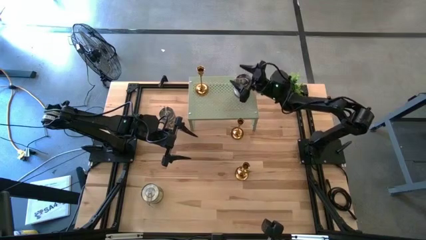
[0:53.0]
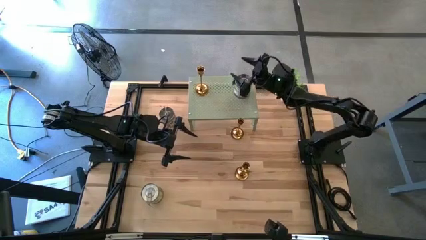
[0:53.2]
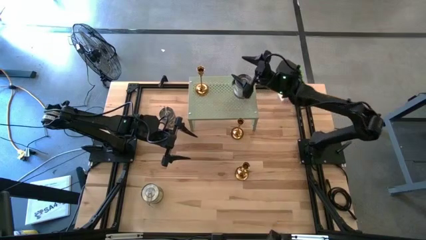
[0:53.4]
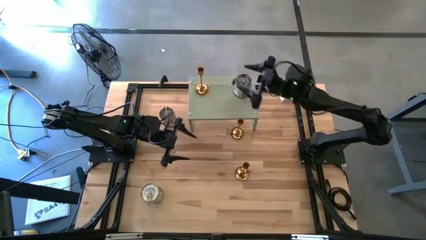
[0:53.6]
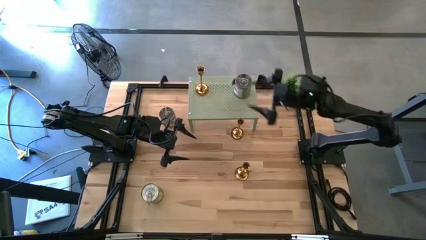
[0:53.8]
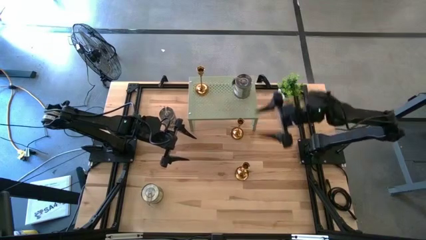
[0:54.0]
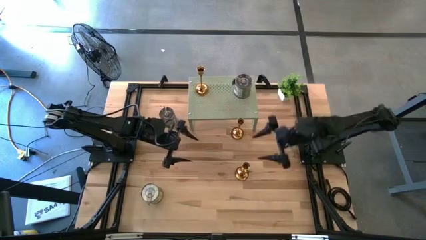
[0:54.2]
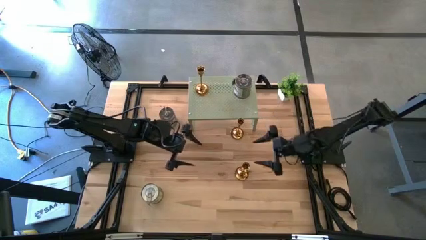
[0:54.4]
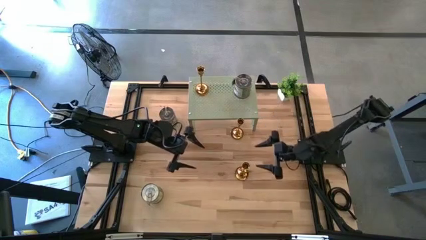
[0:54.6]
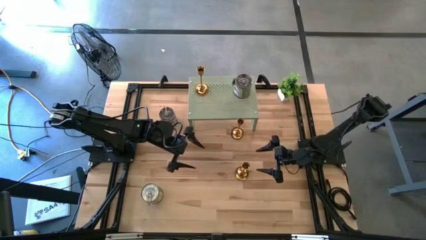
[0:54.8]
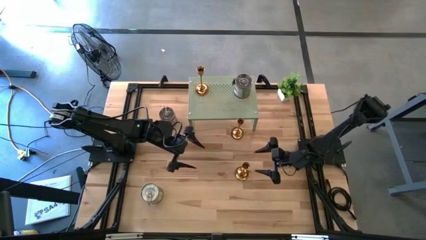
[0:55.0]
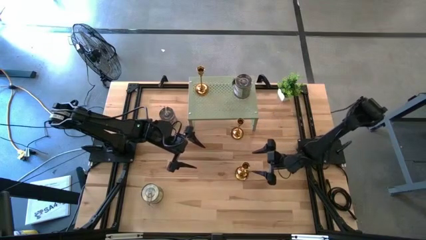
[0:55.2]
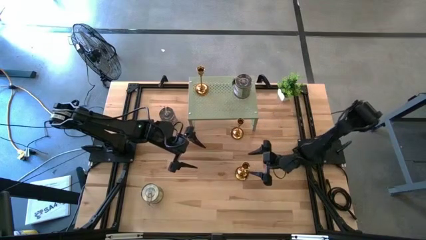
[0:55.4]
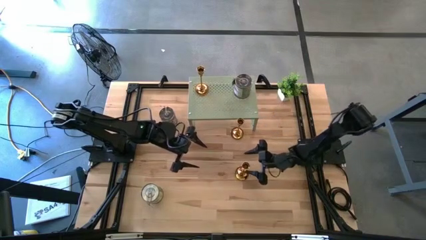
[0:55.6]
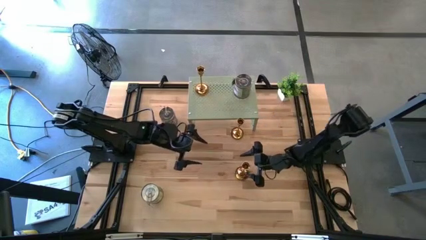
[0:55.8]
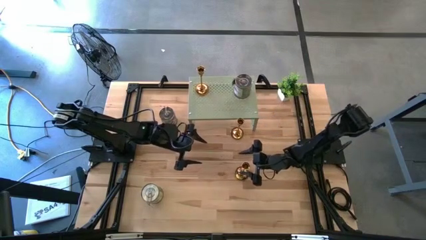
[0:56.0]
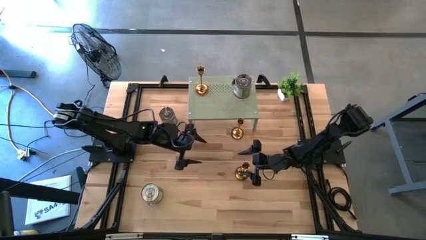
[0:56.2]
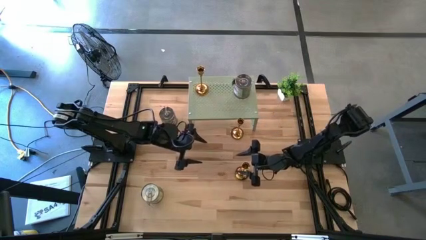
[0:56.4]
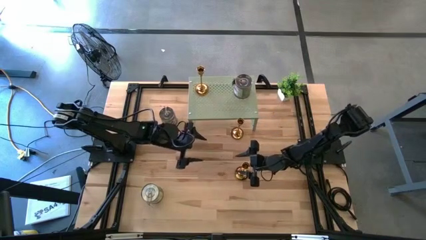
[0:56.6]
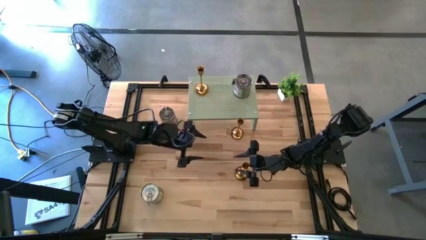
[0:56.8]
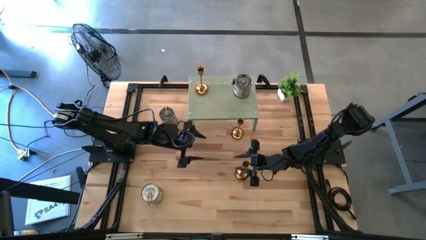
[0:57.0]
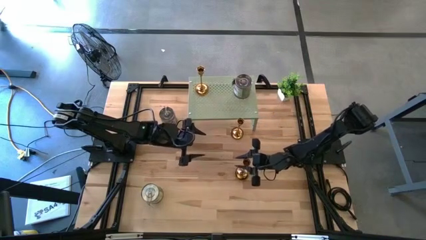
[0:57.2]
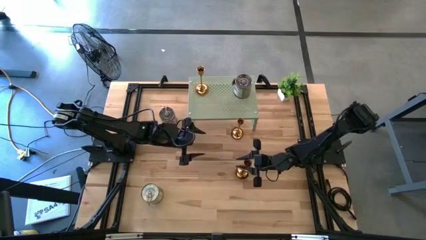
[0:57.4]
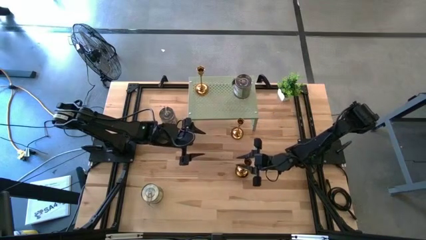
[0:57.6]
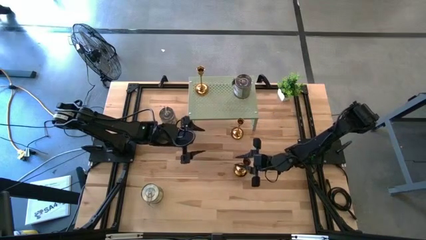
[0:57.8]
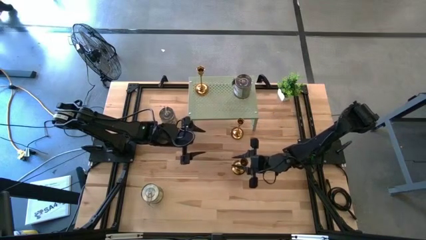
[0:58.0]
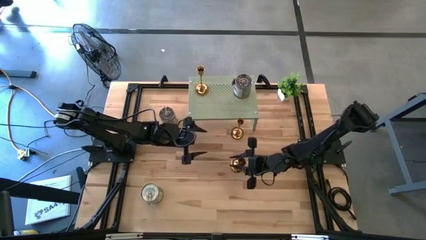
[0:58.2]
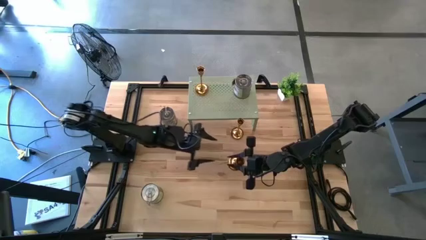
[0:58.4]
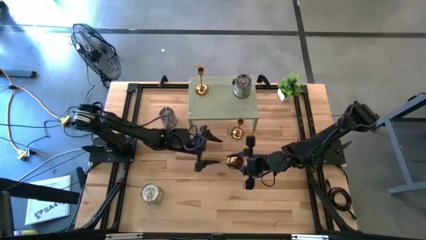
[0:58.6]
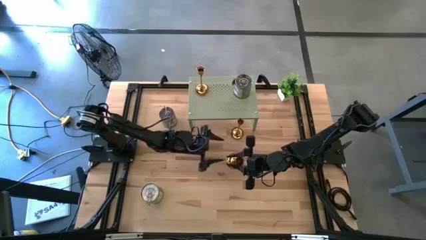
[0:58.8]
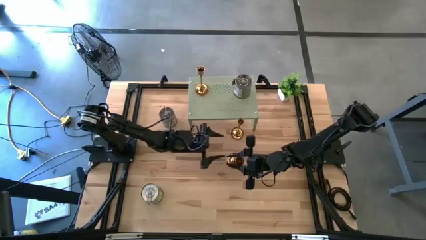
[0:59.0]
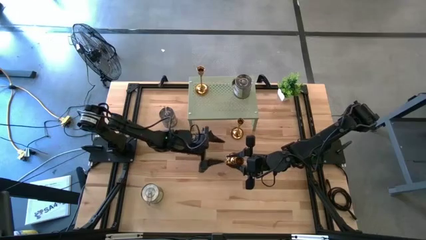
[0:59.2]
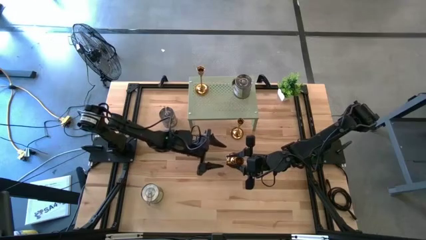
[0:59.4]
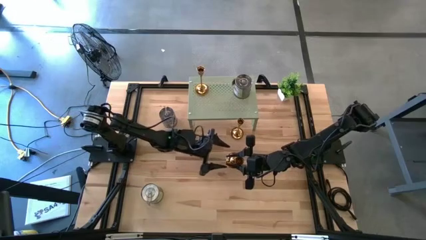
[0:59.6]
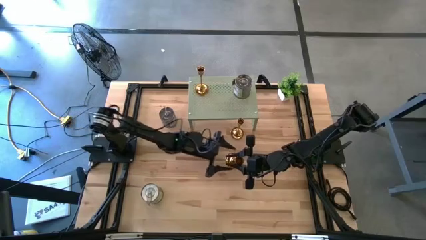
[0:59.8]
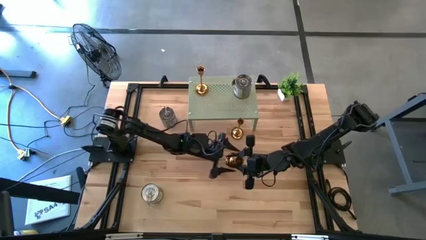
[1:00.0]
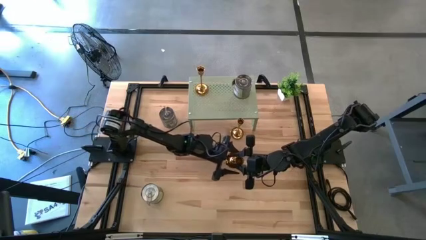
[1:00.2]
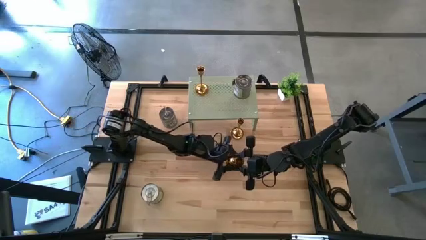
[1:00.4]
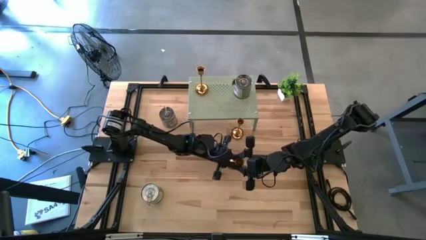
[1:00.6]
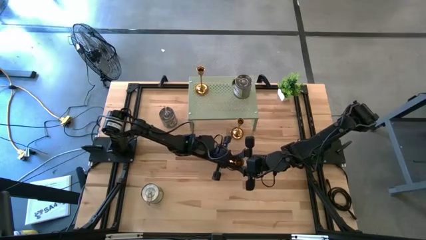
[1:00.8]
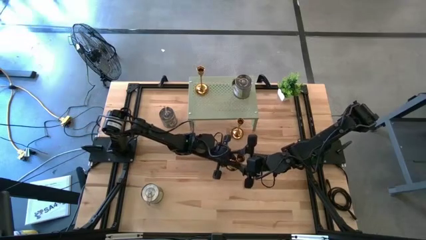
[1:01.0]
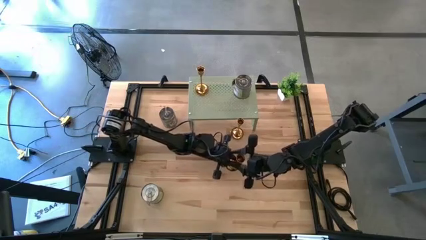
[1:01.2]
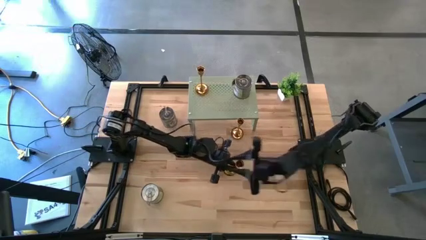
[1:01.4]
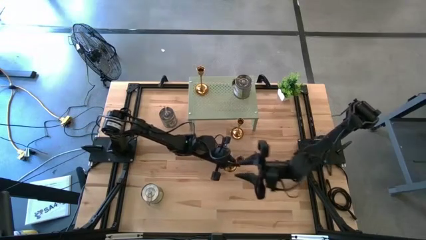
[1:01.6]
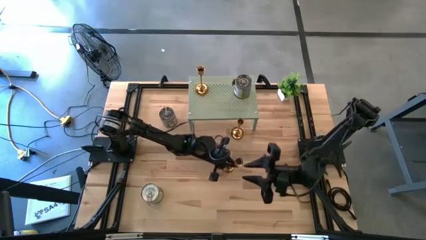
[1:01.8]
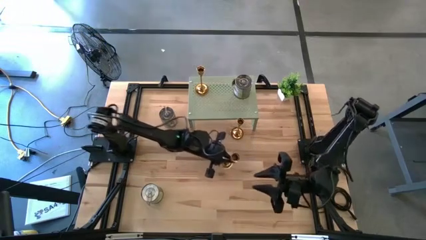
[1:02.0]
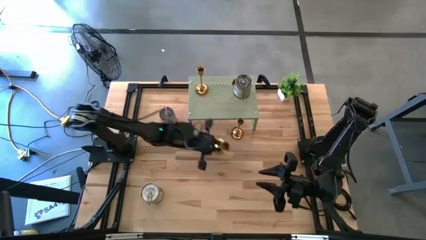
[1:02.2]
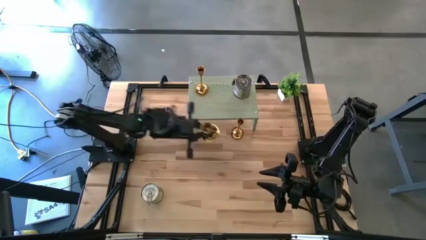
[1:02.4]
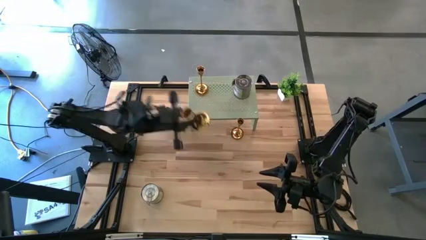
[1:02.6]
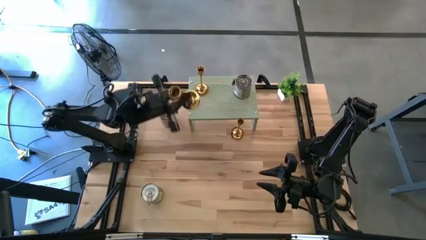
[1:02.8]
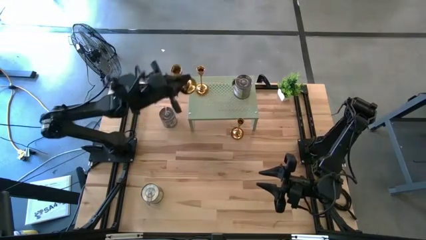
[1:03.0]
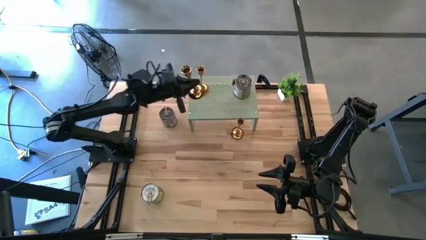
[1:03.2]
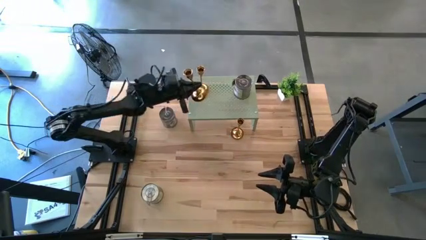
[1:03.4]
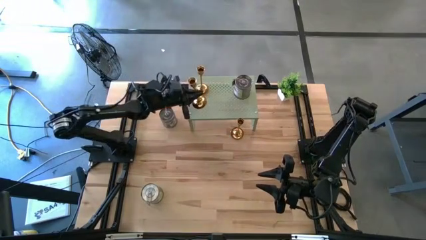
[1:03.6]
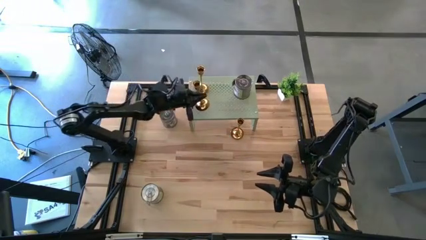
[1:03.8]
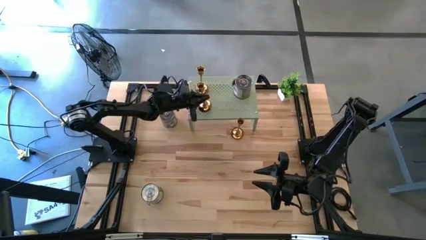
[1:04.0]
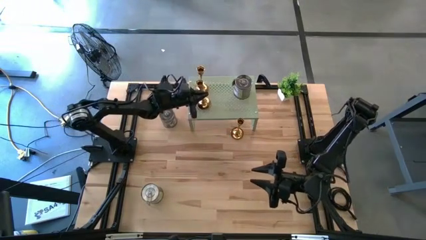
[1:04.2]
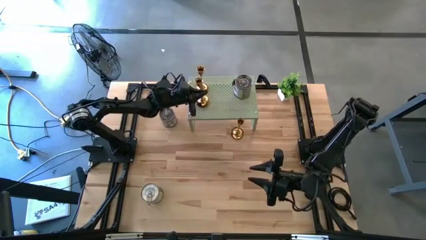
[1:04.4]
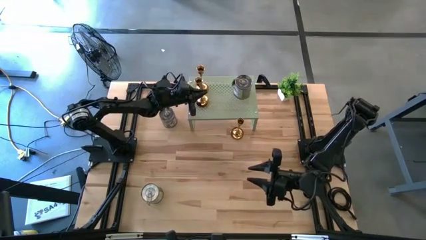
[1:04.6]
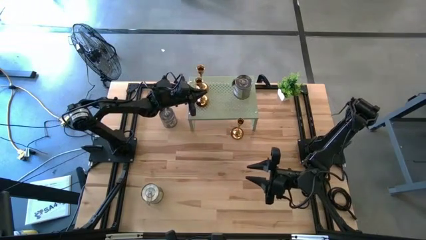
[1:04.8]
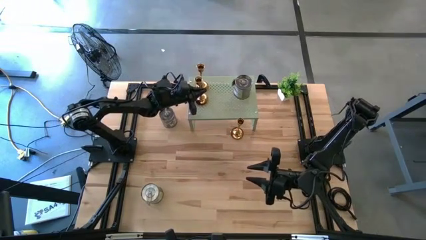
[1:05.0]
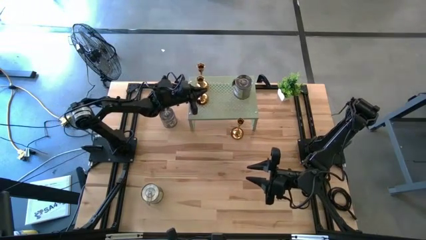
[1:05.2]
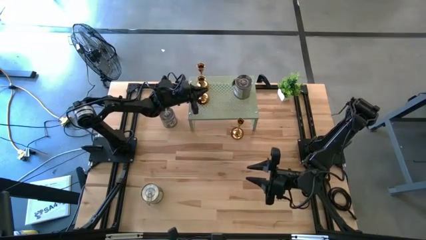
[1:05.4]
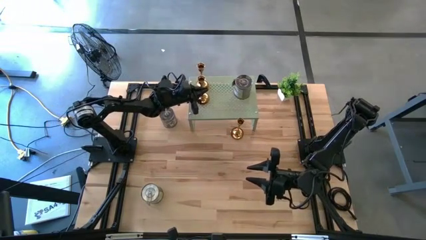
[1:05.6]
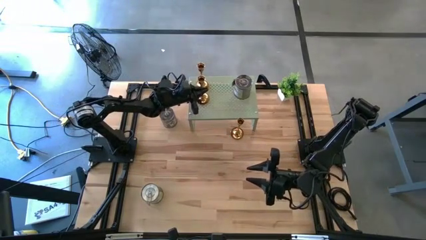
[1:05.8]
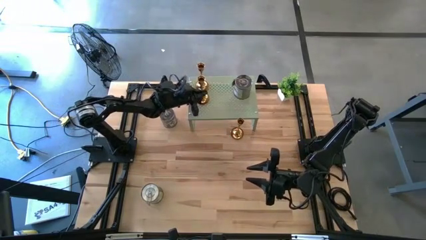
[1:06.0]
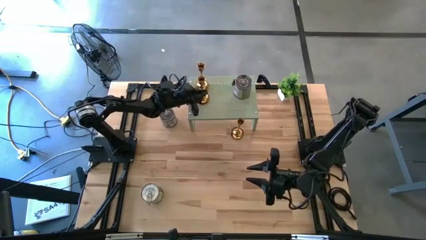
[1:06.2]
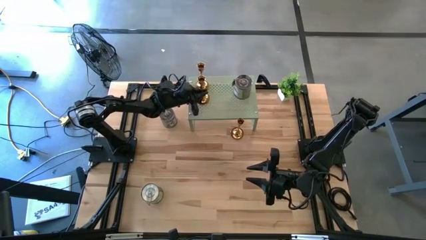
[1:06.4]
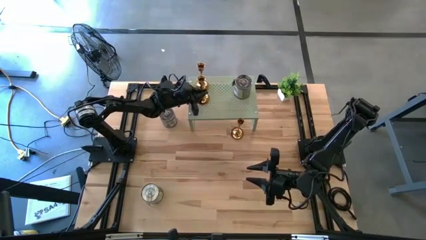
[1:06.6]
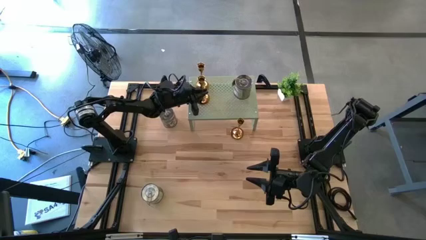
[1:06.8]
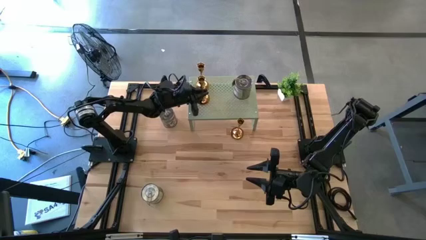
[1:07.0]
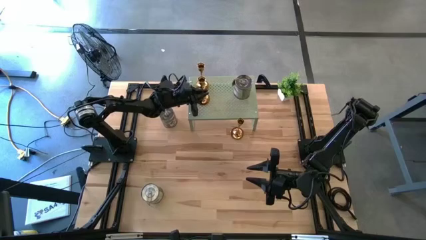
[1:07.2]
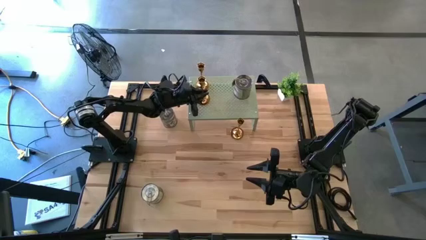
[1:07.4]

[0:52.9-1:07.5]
Task: Pick & Place candle stick holders
Put the bottom gold candle holder on the shelf aligned with the other gold candle holder

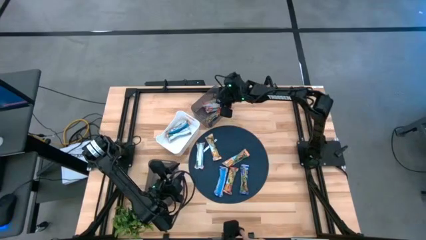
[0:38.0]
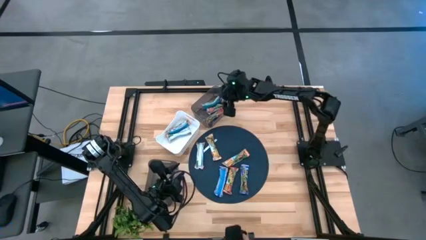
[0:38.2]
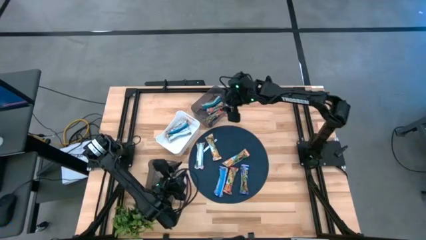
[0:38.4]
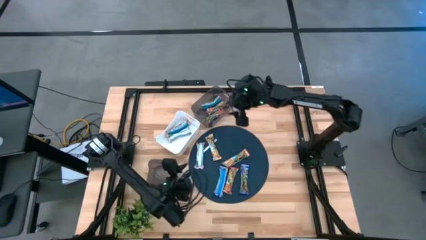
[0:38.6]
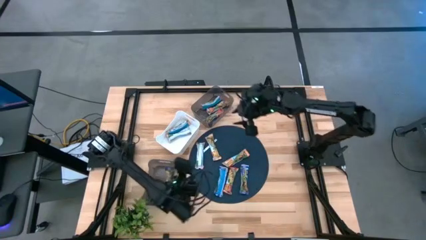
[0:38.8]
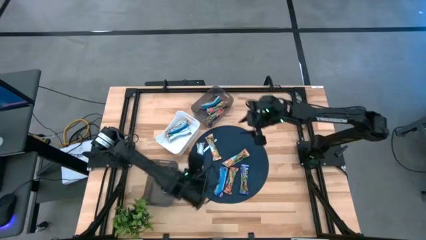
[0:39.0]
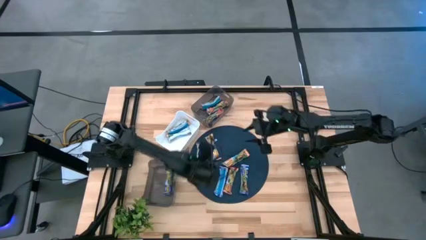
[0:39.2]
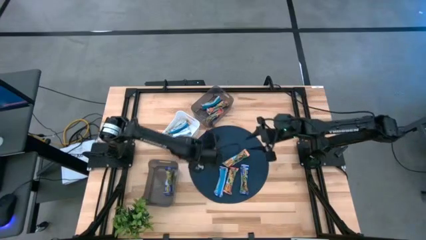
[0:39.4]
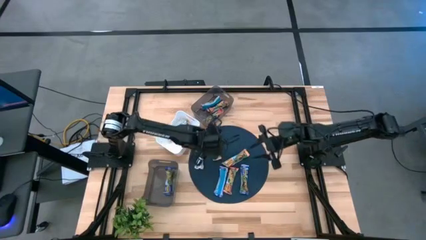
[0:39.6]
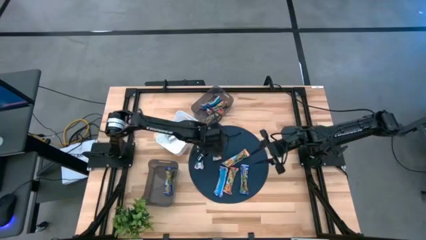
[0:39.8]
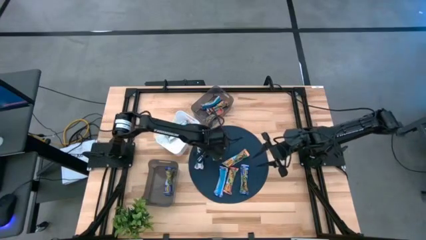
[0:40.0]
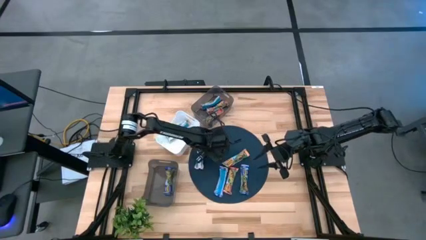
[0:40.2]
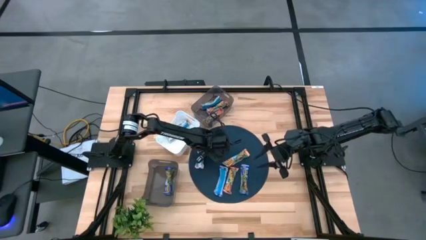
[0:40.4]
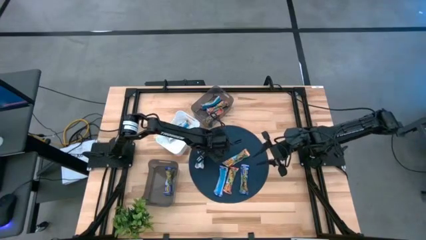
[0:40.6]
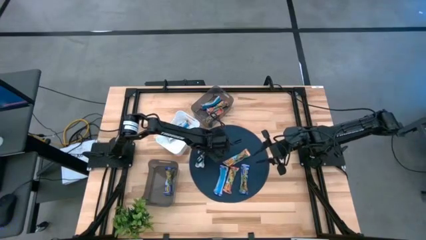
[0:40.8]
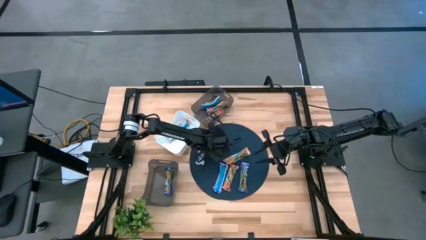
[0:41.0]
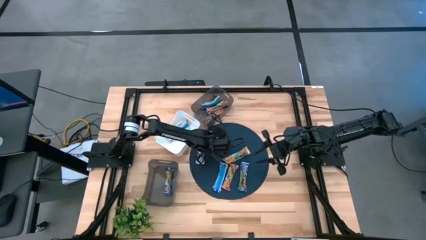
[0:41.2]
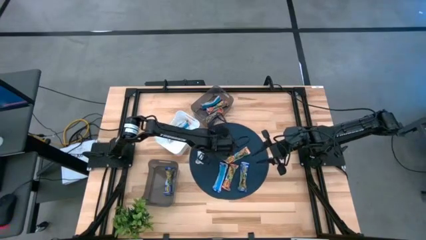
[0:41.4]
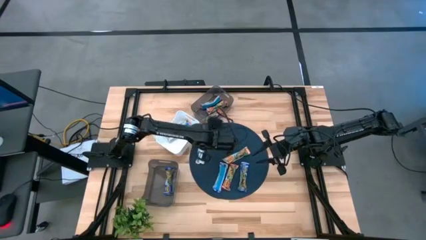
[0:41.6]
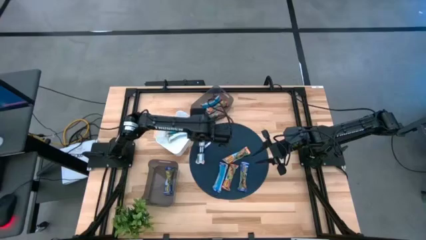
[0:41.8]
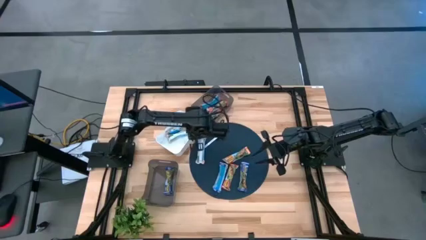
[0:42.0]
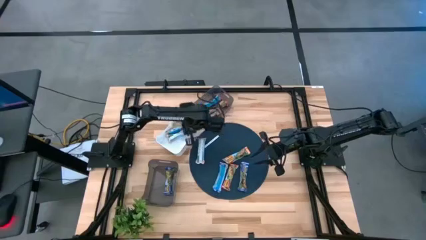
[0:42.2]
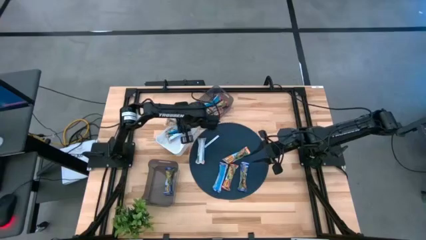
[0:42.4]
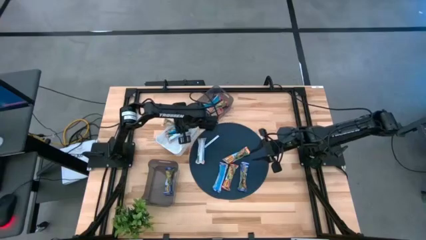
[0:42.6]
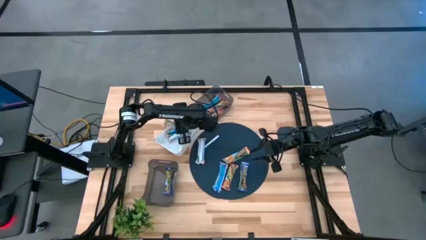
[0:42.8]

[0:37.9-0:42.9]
Task: Pick and place Granola Bars by type
Put the yellow granola bar into the white bin
